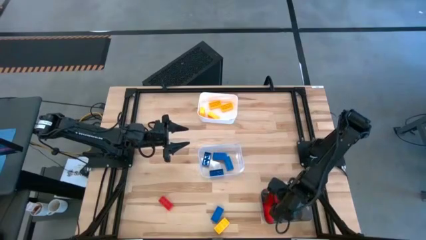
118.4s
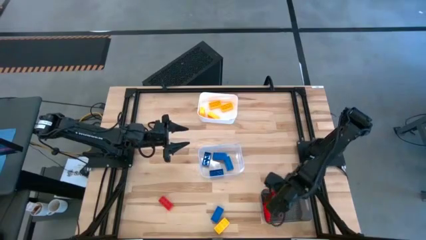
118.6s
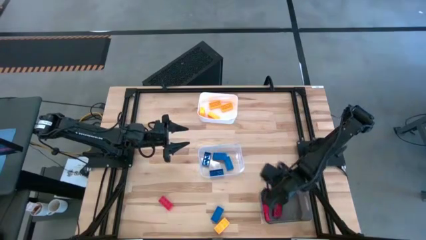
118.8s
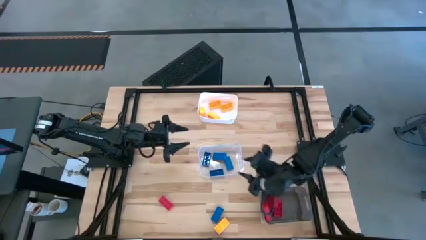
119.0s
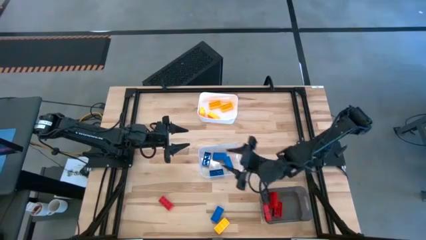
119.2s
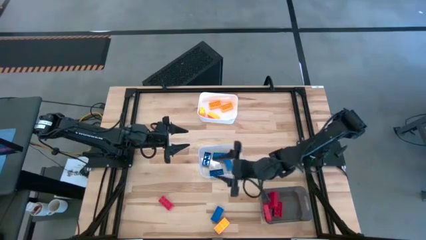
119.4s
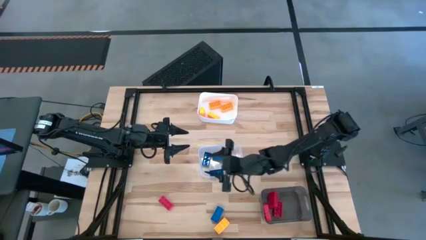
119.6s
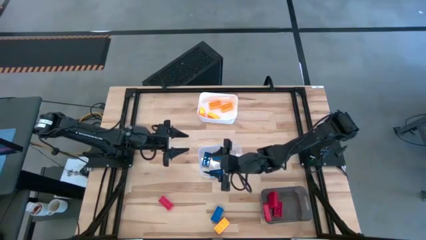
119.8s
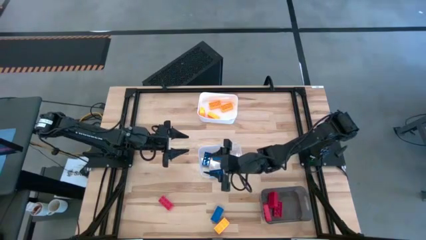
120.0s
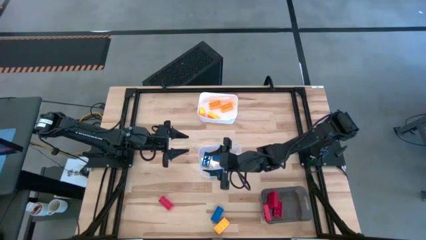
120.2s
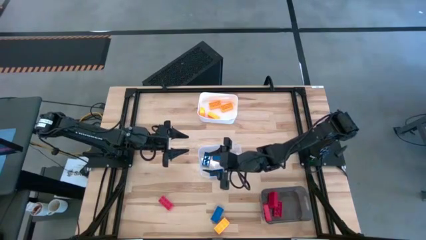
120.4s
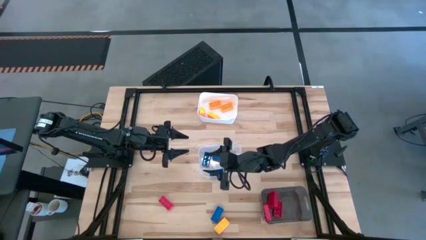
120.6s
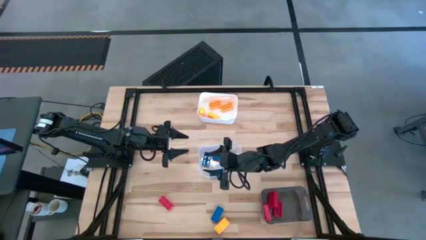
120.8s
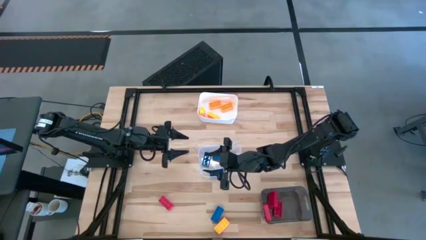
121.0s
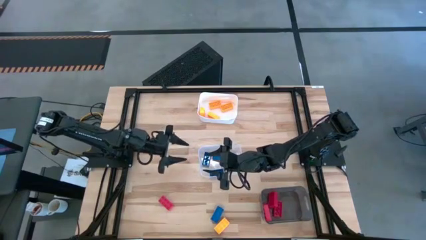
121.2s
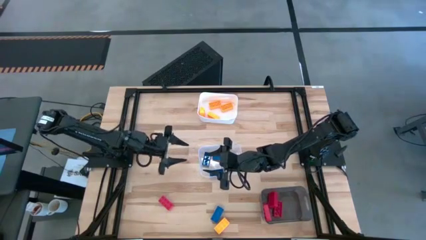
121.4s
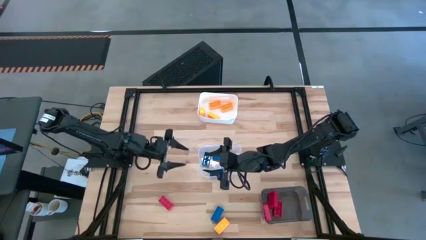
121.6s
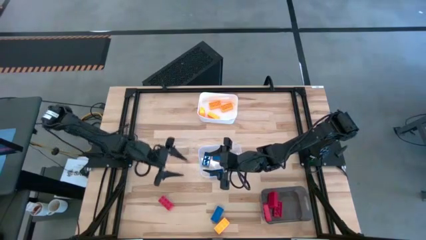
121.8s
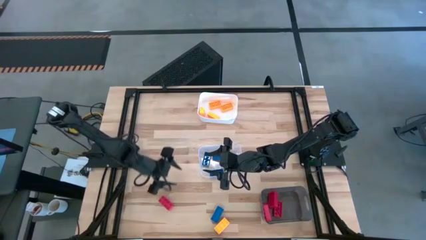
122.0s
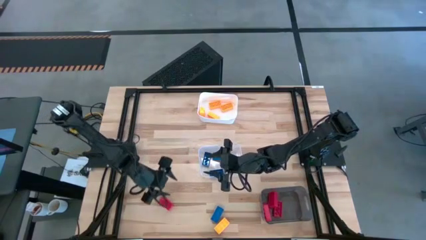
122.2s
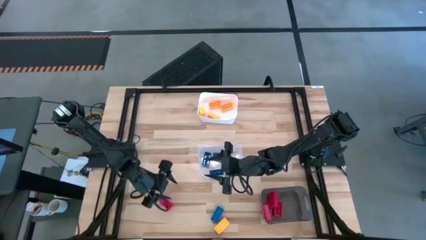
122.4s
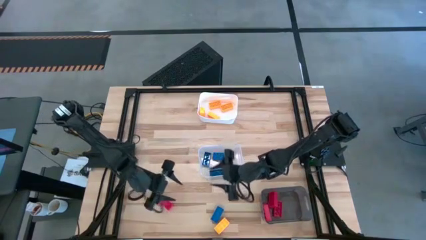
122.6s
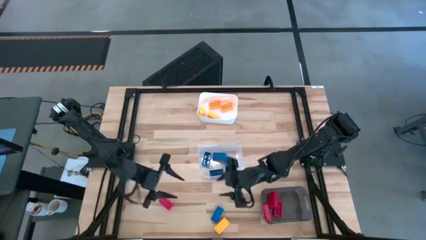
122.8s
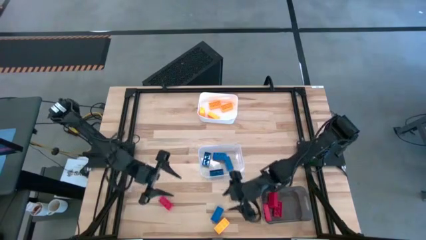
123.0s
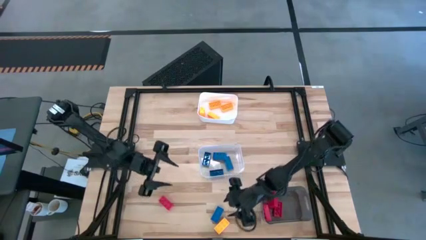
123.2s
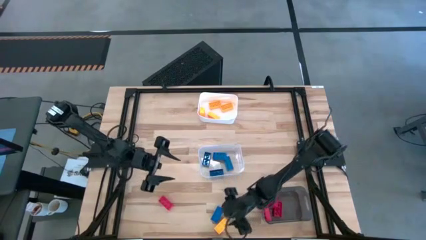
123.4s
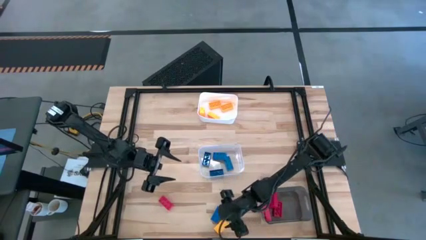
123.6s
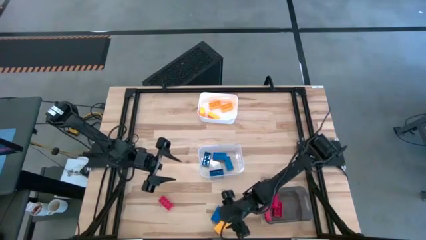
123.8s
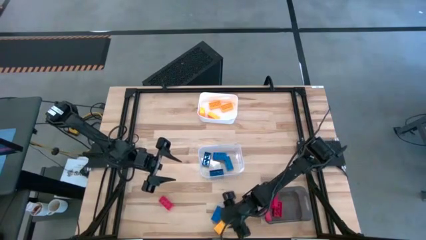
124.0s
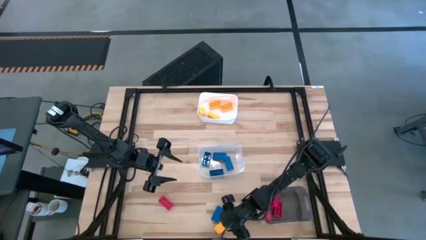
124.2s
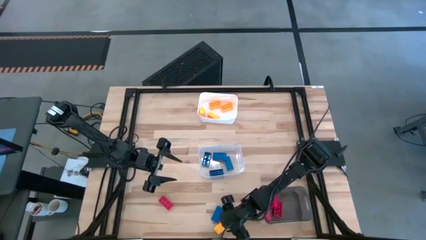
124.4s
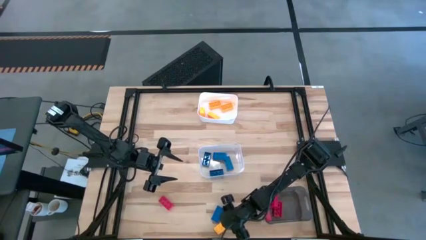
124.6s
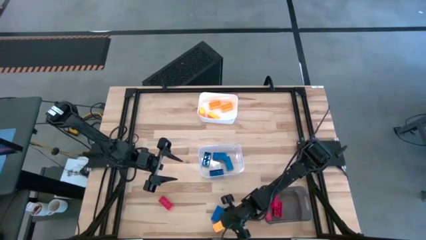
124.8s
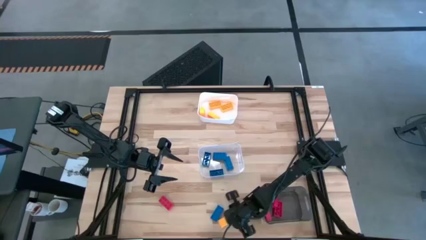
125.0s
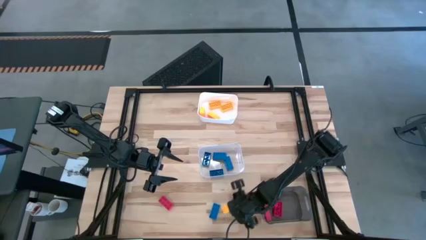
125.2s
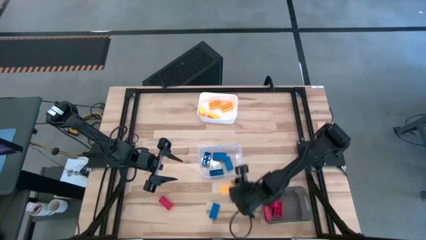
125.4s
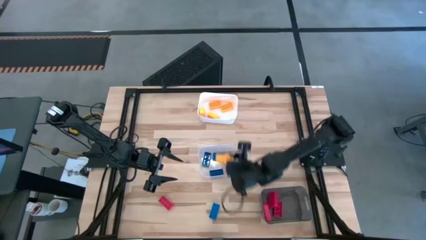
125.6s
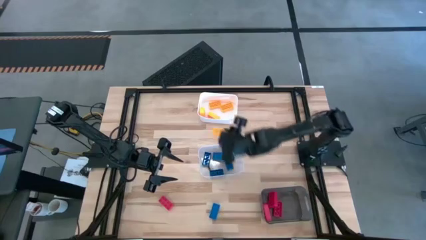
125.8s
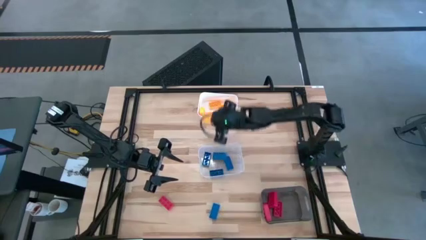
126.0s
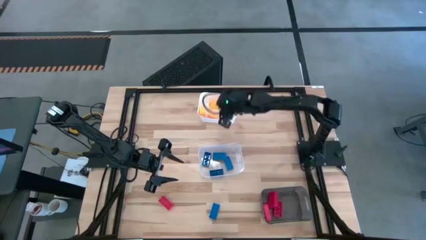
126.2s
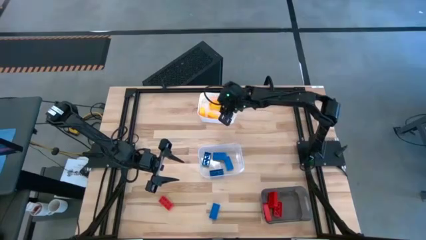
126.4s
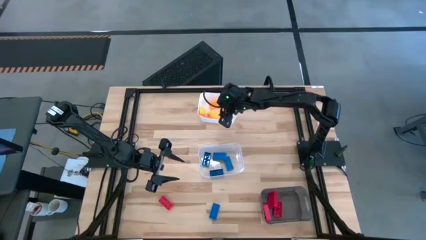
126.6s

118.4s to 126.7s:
Task: Sort & place blocks by color
Put the yellow game piece into the white bin

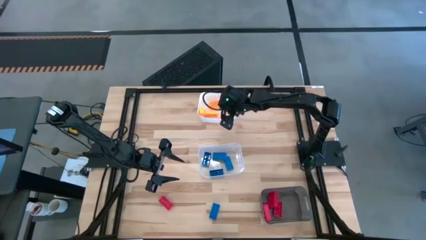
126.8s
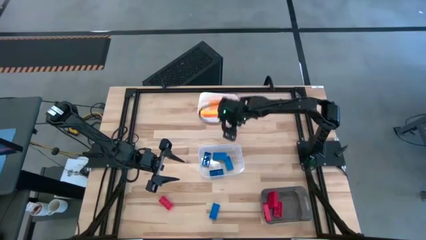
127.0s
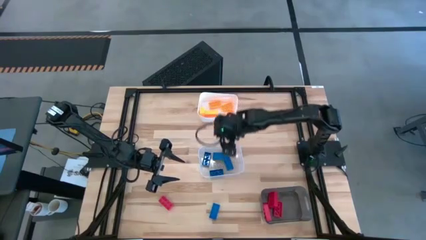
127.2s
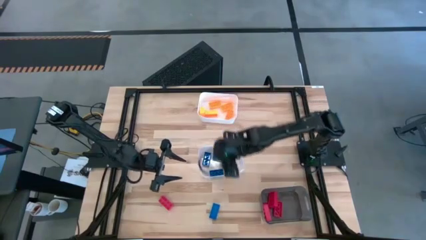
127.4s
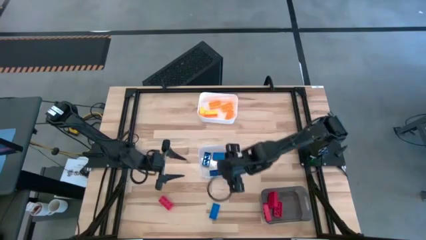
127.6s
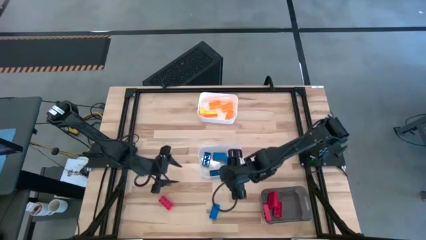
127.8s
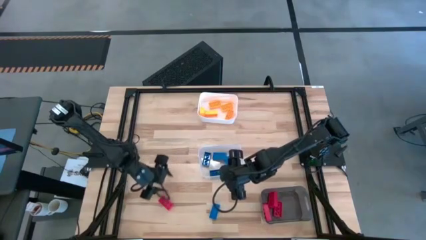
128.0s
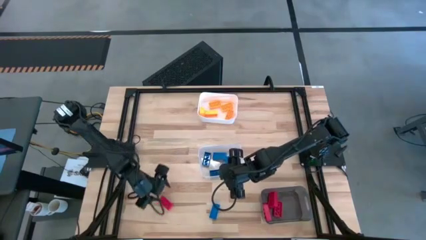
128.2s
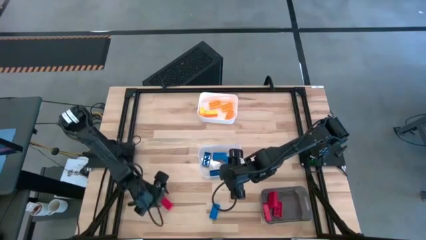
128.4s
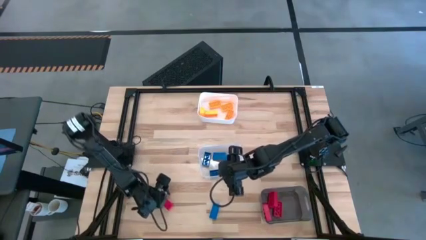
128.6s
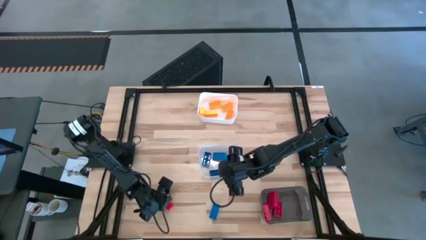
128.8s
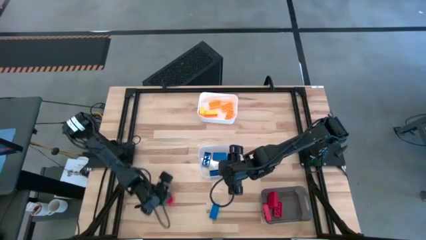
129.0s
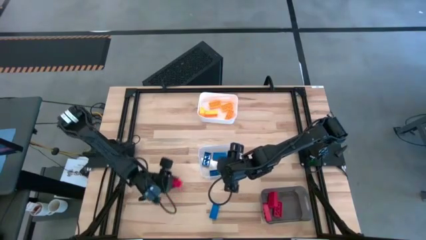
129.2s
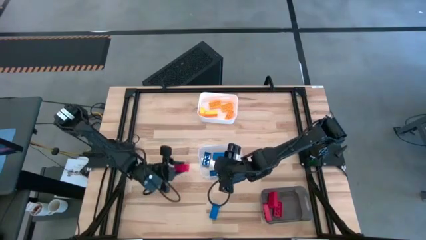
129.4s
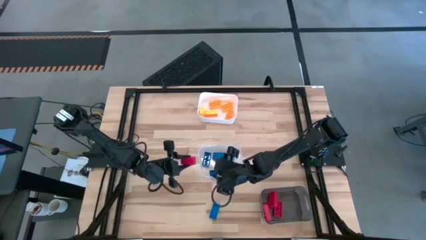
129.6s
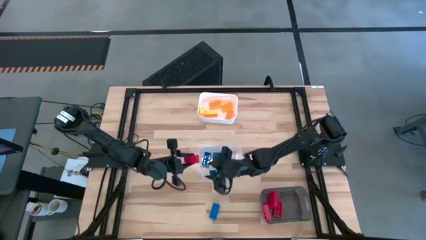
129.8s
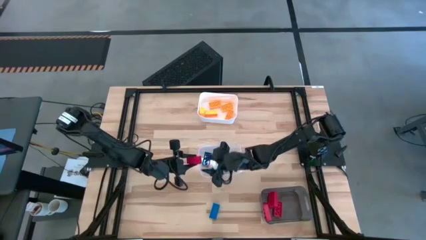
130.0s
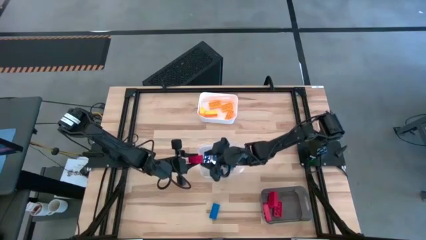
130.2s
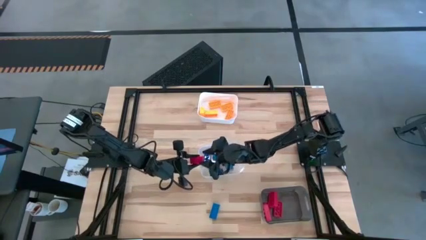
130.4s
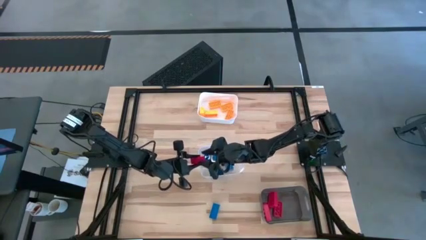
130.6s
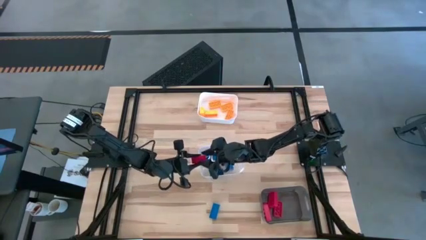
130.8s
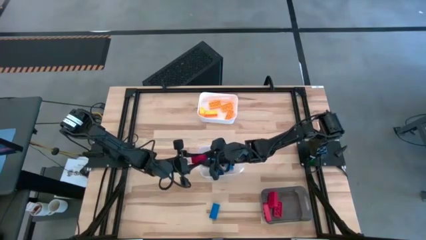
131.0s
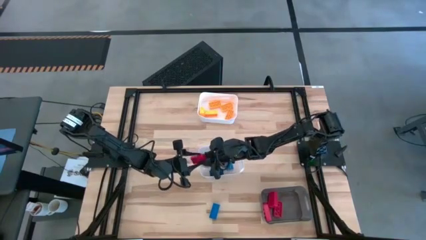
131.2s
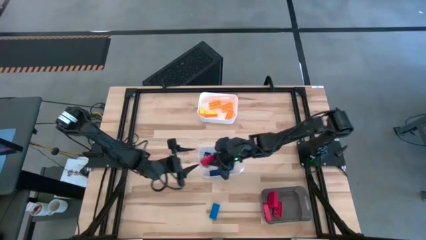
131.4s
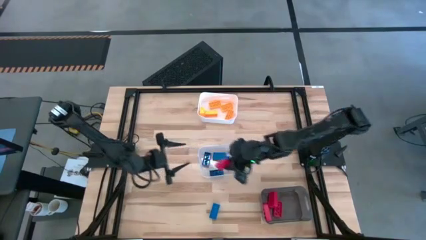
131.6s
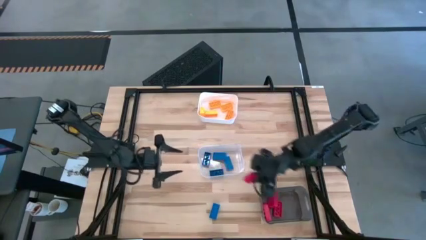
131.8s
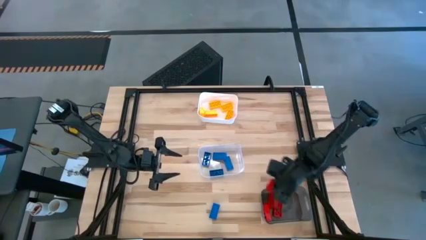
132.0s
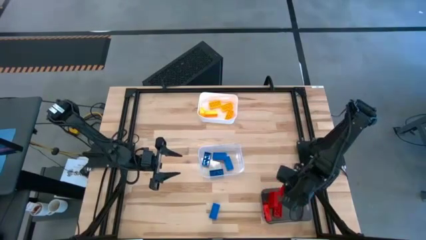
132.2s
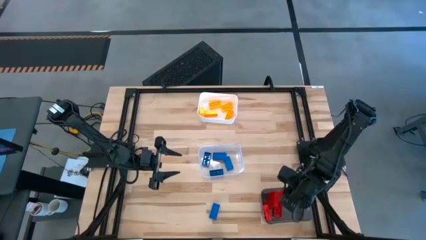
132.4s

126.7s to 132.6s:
Put the red game piece into the black bin

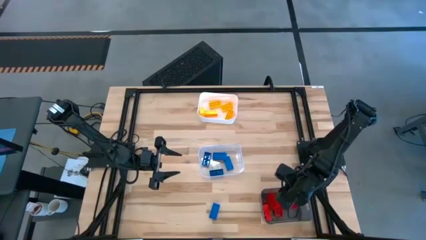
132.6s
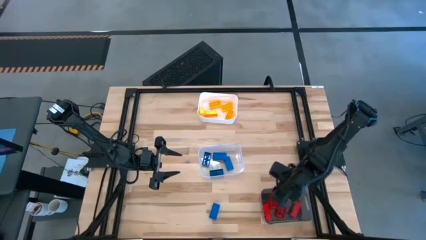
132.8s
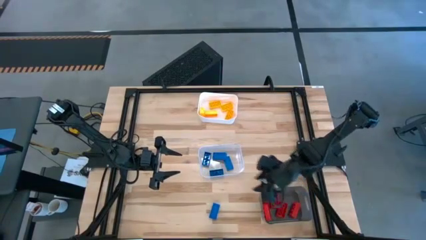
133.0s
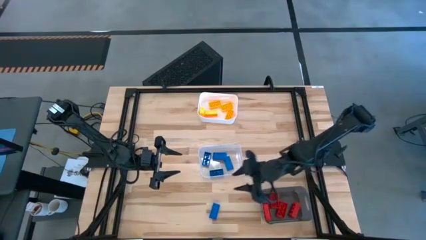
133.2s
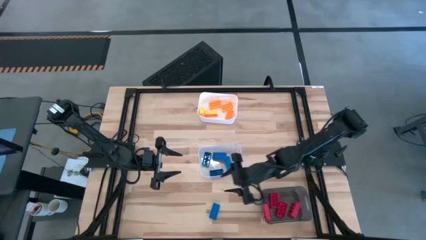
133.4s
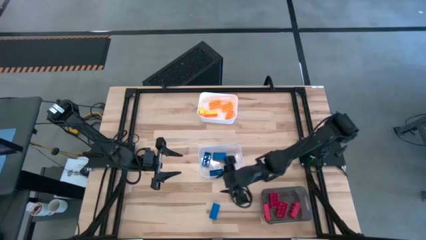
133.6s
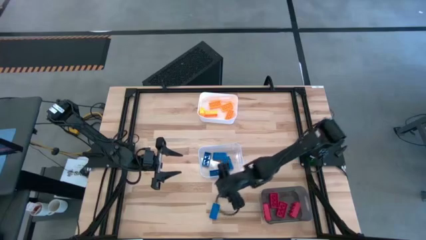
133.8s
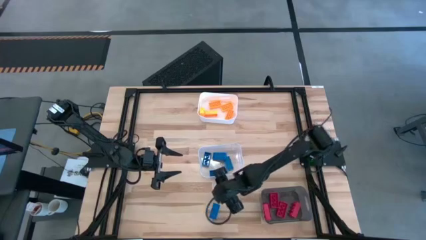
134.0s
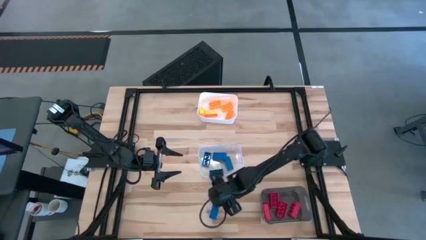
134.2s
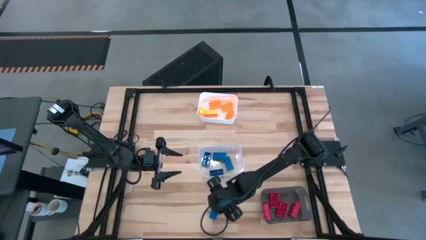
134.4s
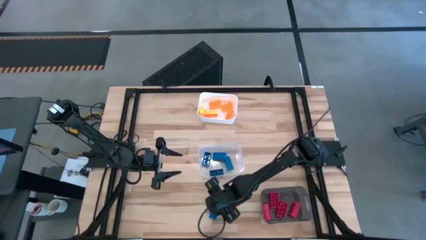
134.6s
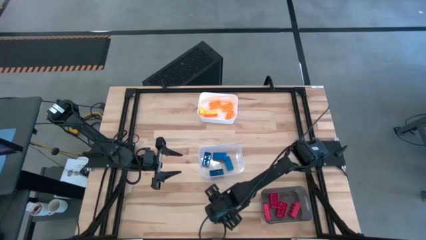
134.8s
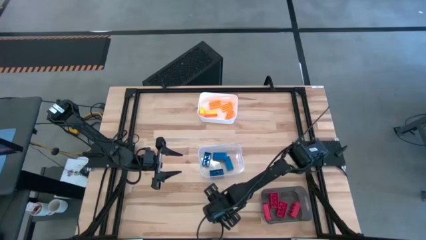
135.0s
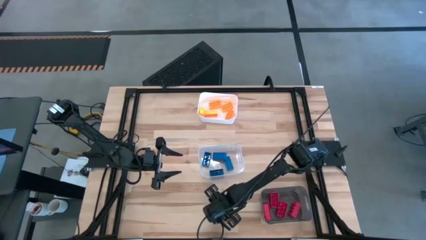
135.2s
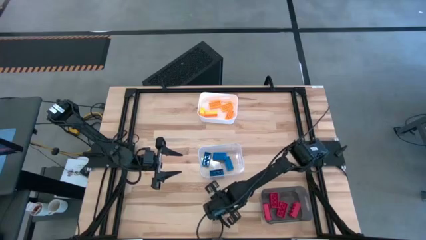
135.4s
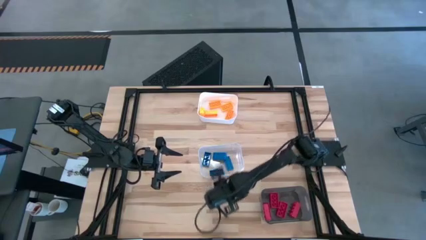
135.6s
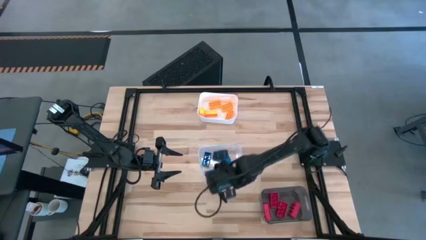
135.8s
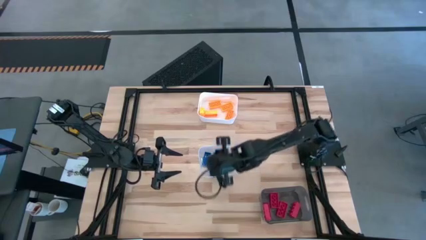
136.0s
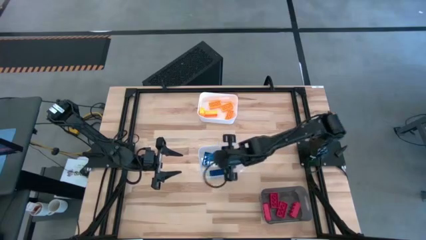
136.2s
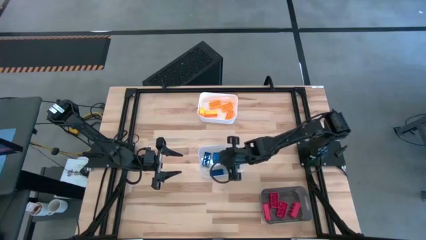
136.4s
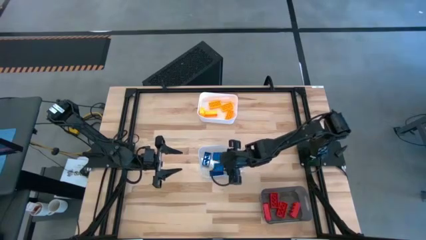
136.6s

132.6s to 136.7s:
Put the blue game piece into the transparent bin
